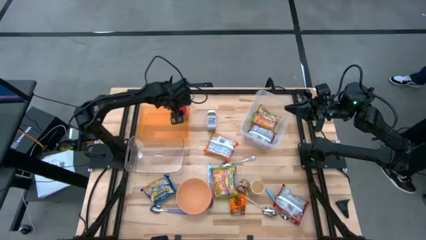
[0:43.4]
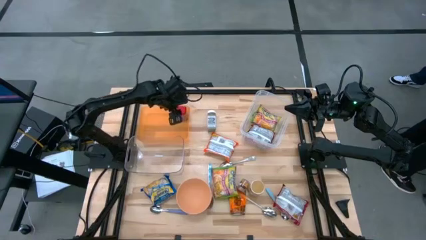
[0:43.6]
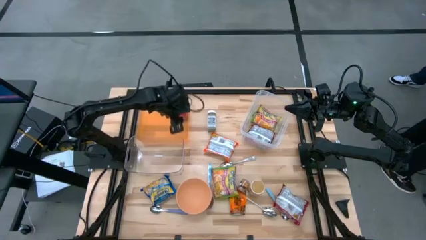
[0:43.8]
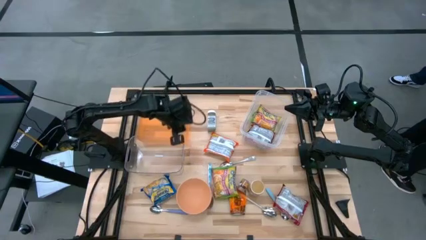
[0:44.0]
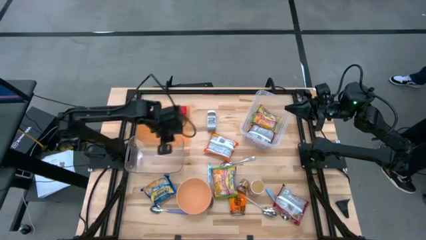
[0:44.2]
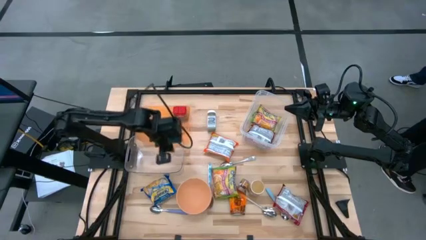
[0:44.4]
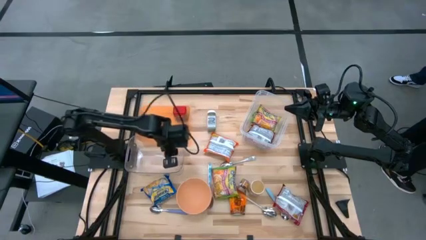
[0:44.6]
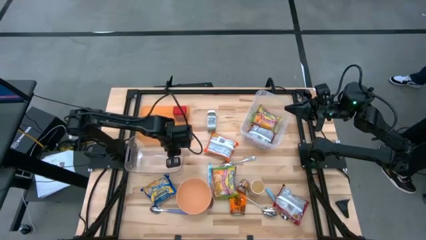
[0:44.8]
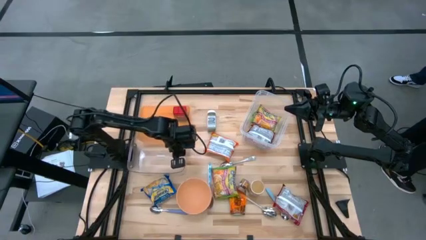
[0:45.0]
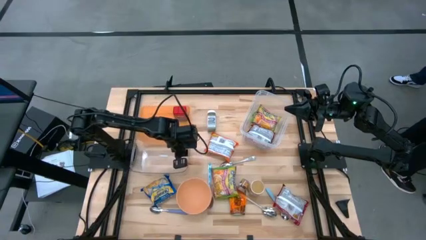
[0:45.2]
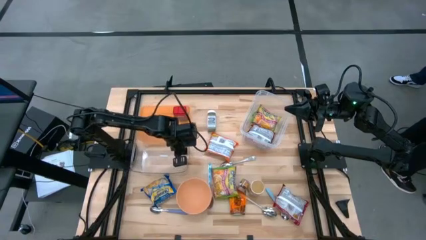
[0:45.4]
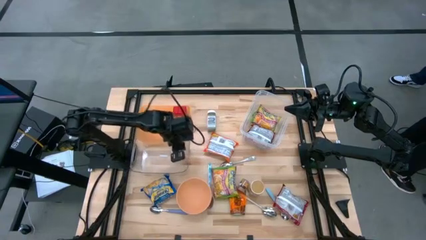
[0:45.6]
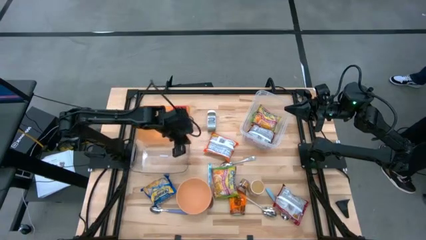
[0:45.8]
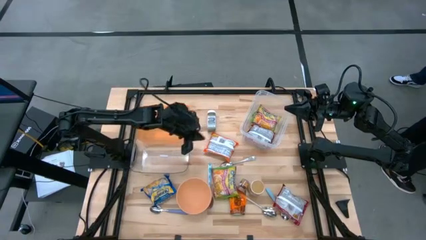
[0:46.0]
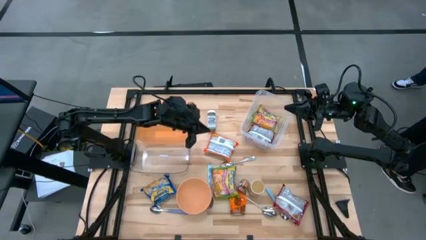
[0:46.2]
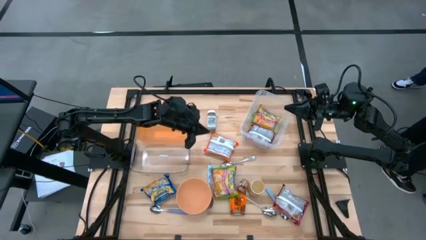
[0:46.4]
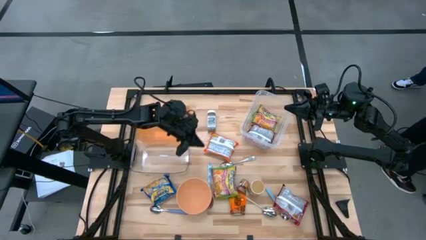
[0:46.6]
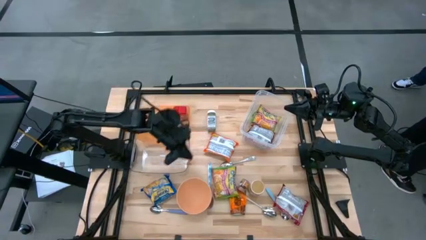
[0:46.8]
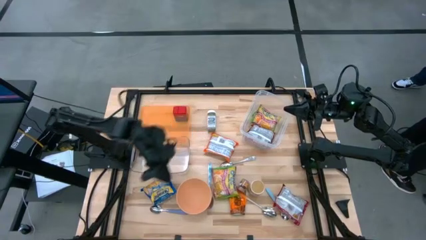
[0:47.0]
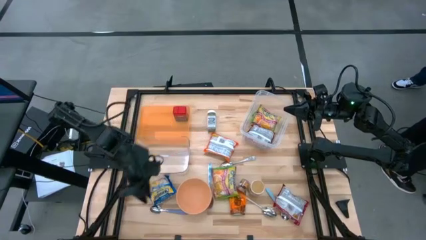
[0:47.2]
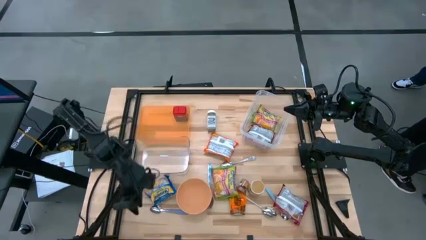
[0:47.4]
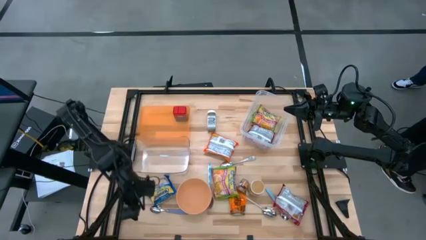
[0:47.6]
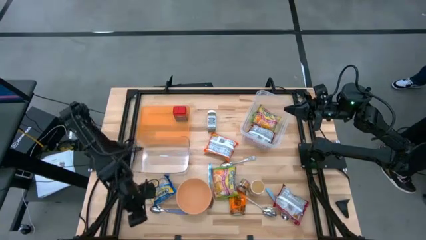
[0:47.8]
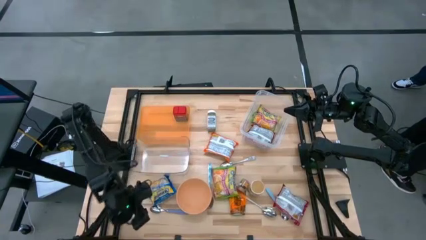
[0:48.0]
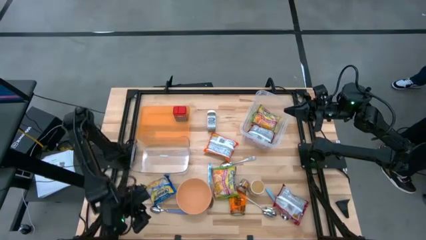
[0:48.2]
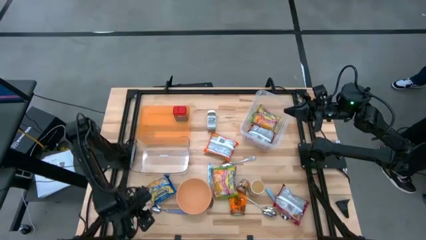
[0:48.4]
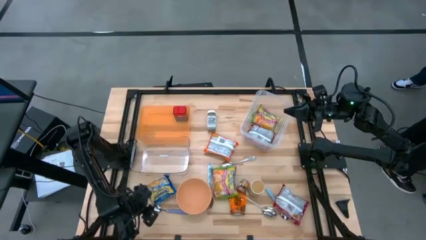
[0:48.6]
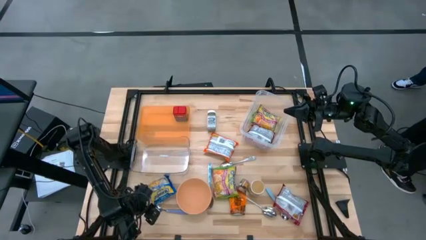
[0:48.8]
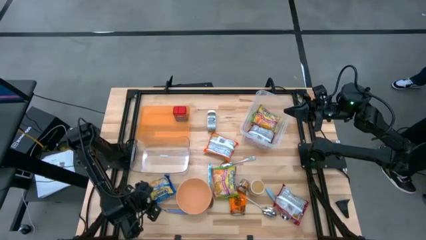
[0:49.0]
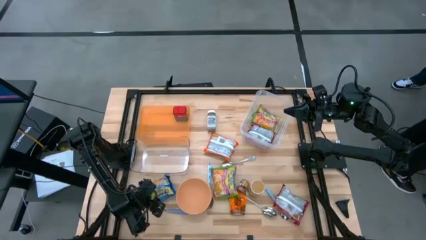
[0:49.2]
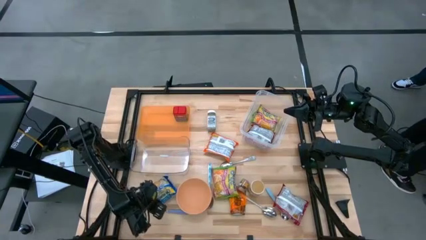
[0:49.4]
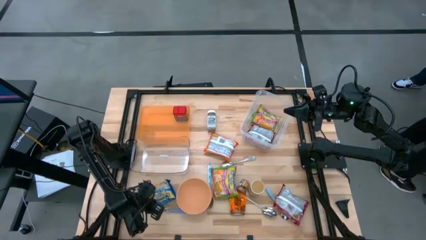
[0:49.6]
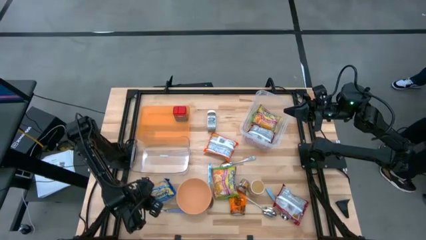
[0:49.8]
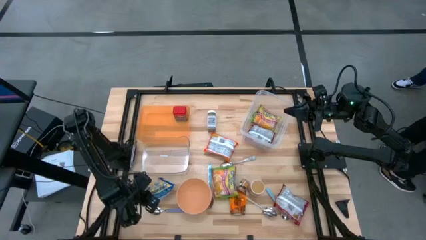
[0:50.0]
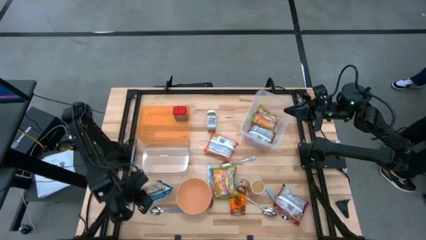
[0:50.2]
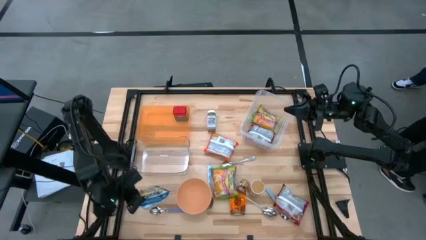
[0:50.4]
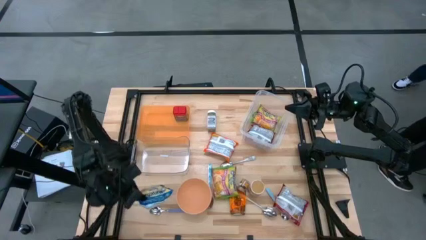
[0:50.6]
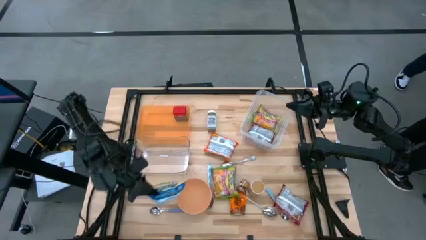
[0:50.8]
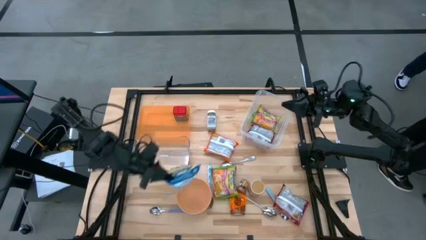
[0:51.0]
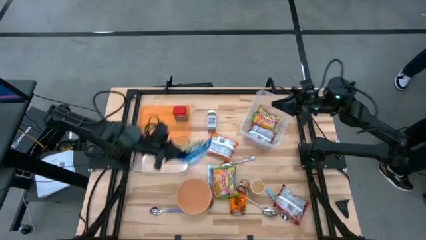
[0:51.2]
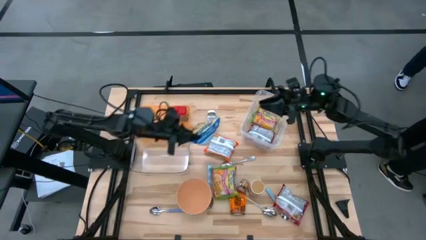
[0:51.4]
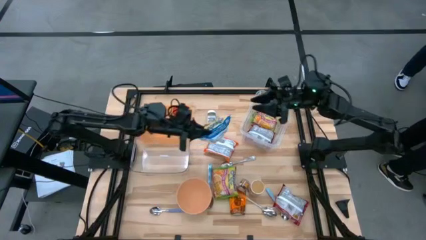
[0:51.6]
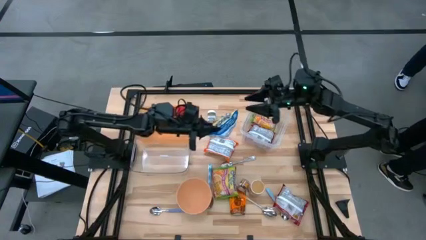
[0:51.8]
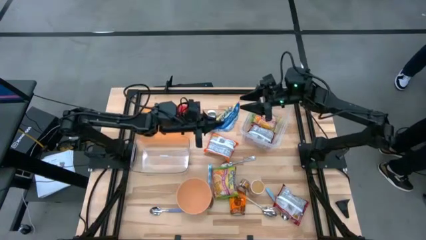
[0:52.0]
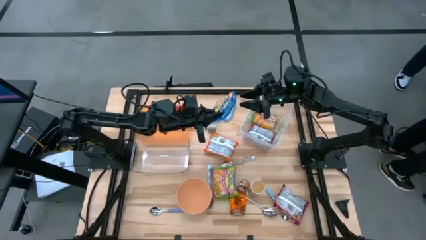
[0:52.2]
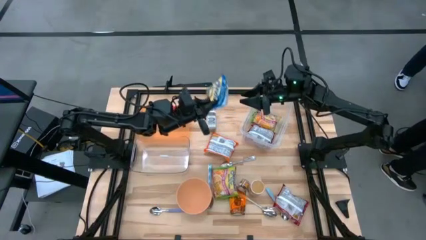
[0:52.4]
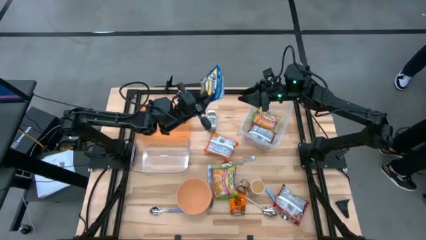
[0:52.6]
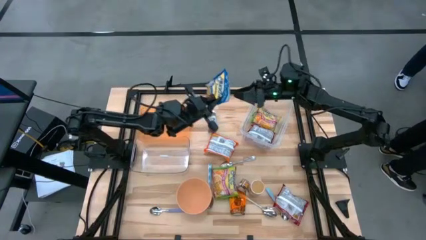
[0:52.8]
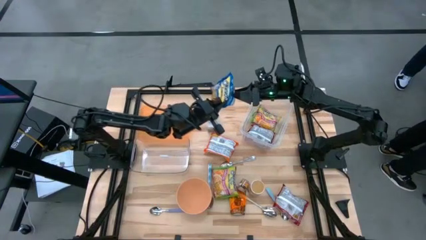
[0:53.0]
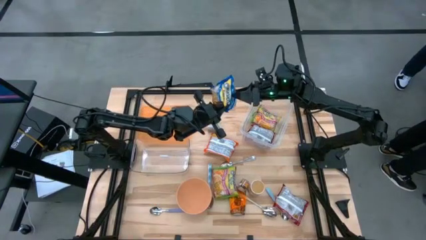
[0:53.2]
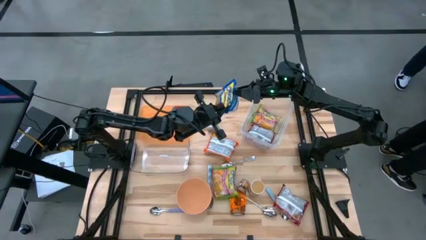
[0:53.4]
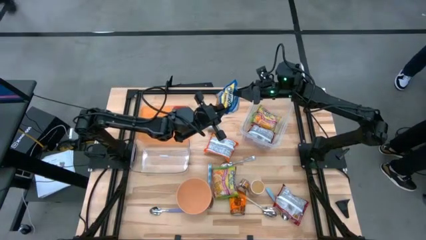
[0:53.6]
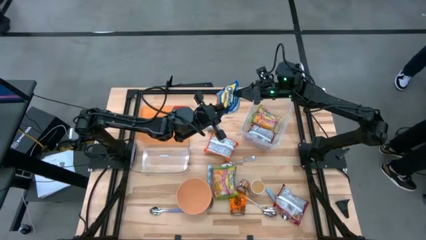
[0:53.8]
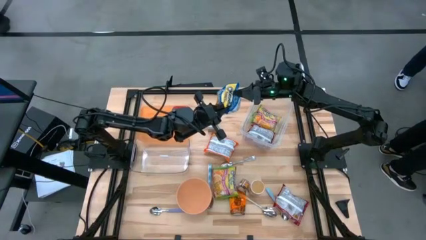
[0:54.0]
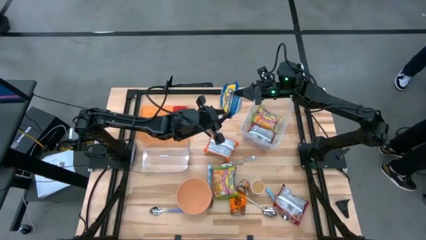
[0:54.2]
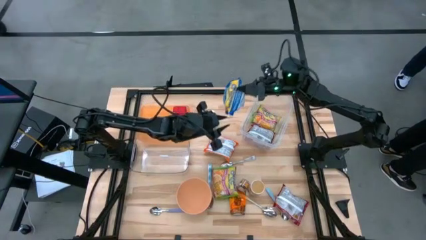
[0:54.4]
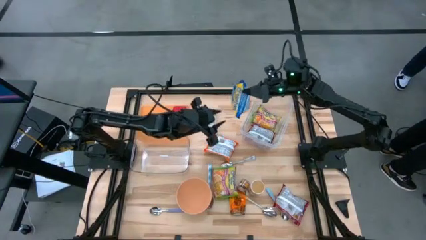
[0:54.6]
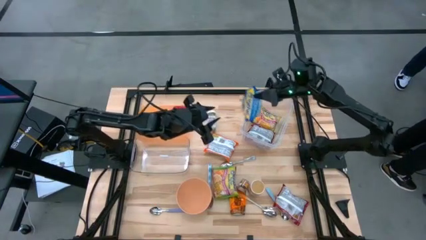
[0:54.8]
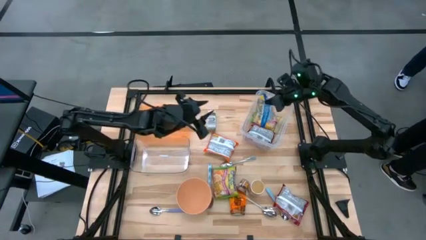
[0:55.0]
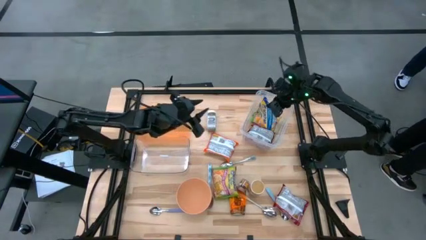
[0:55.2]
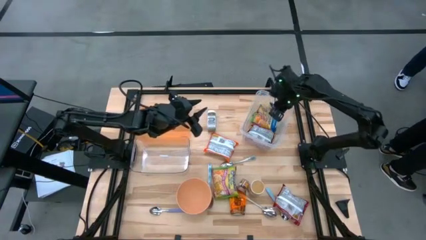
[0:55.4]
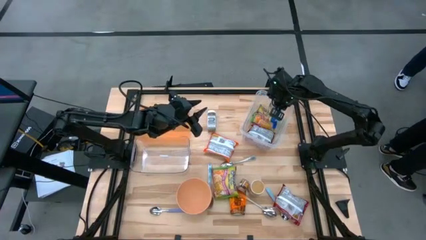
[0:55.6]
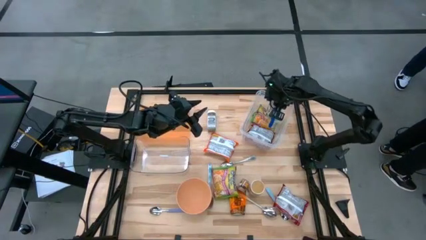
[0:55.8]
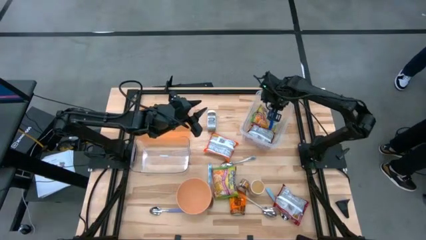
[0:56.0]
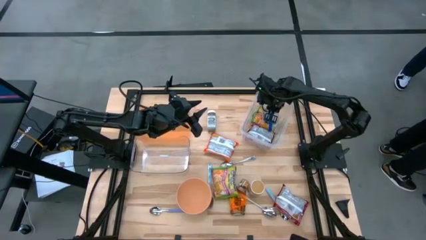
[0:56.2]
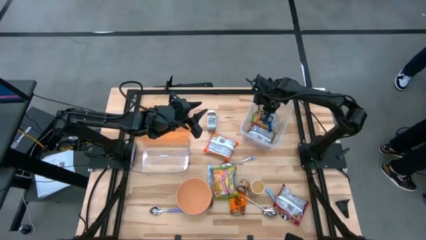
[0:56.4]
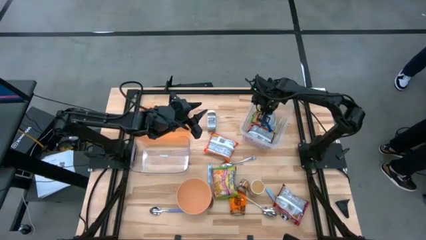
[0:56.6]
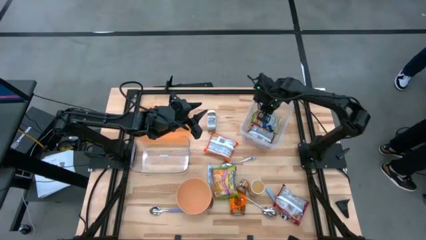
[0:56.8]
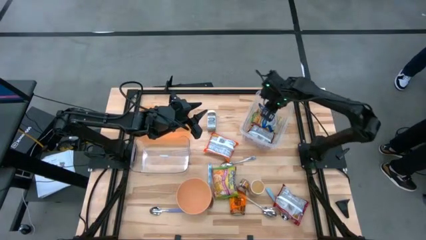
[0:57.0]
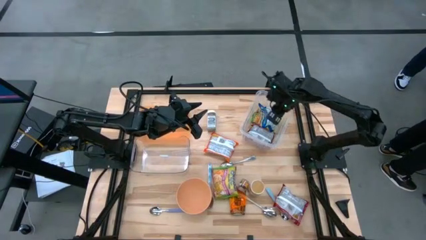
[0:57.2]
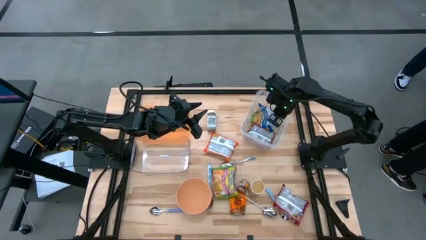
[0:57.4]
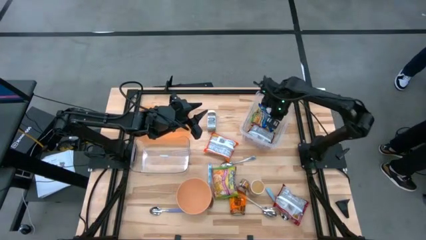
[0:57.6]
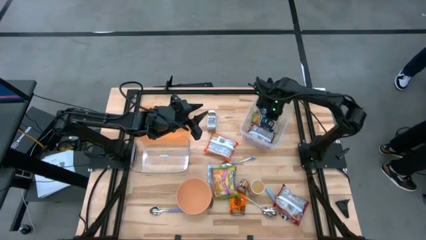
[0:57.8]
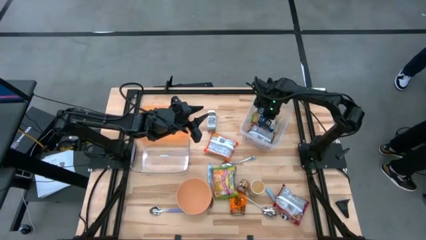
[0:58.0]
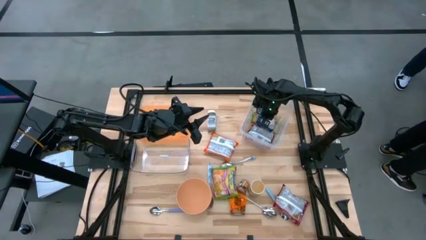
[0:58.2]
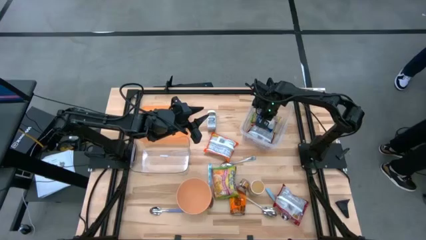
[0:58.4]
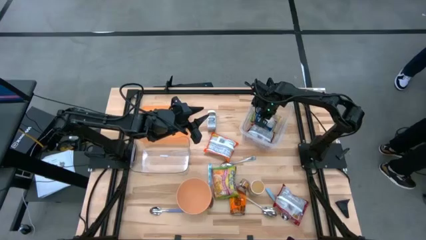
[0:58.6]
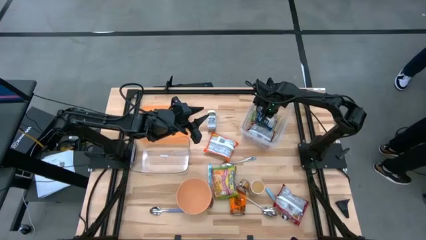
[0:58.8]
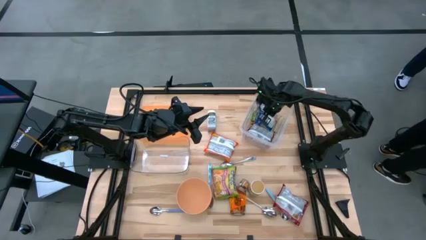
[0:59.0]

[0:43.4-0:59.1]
Task: Pick & Place Food Item
Put the blue noodle pack into the top transparent bin
